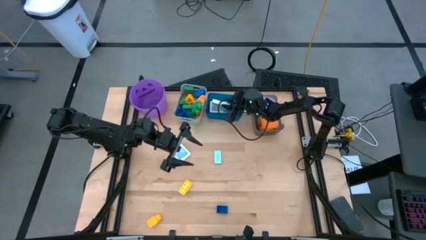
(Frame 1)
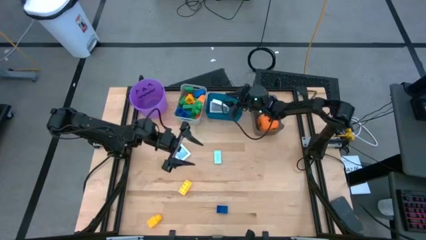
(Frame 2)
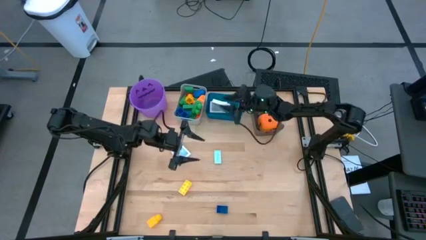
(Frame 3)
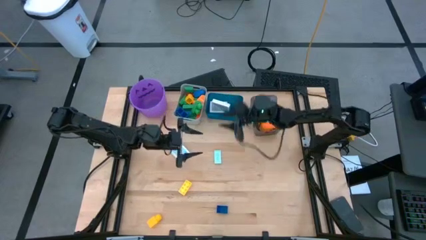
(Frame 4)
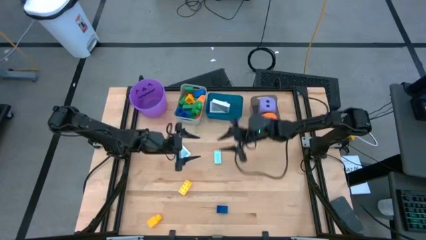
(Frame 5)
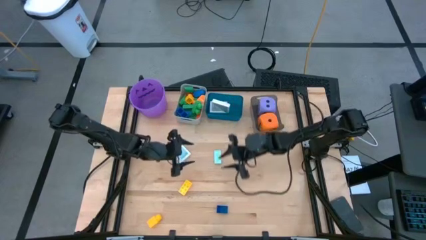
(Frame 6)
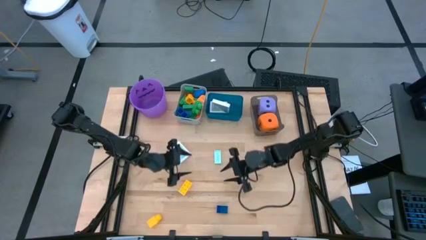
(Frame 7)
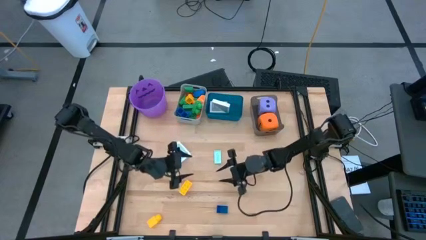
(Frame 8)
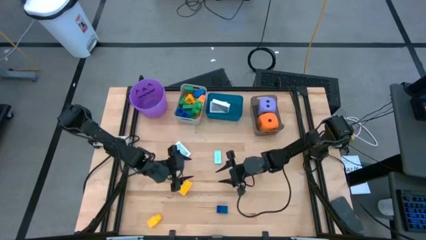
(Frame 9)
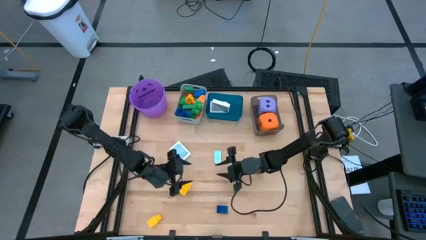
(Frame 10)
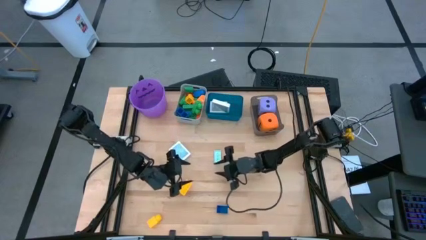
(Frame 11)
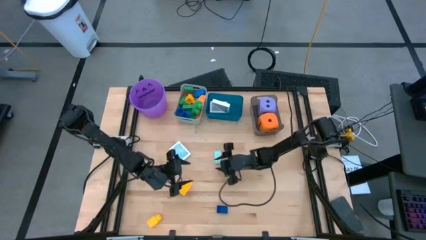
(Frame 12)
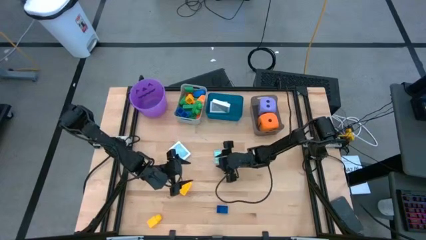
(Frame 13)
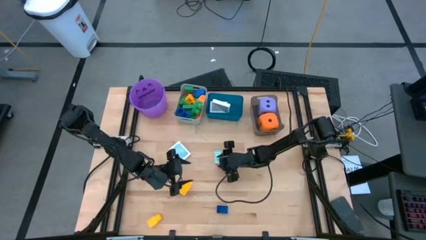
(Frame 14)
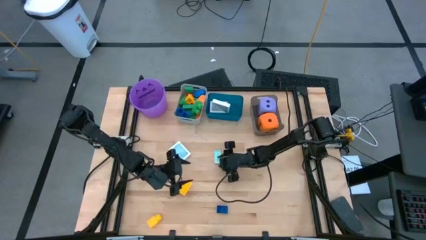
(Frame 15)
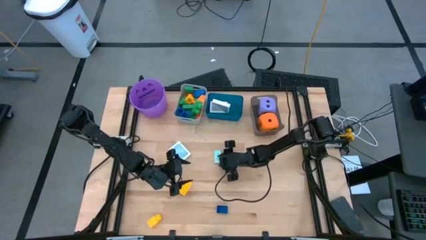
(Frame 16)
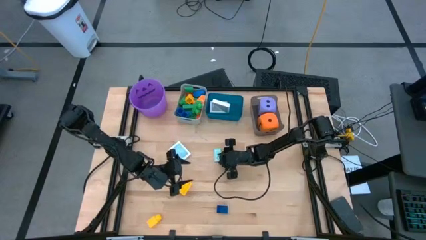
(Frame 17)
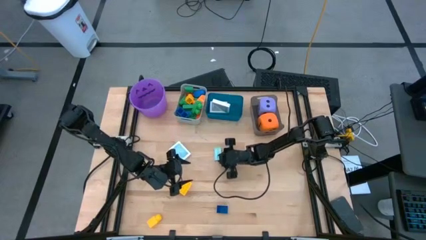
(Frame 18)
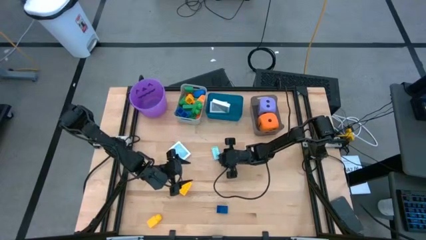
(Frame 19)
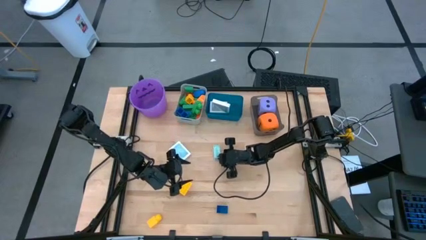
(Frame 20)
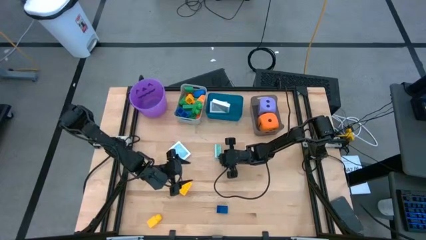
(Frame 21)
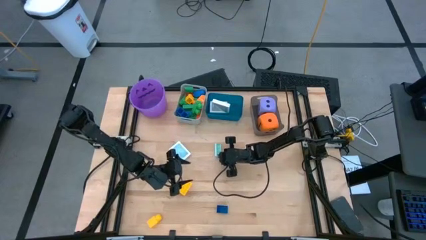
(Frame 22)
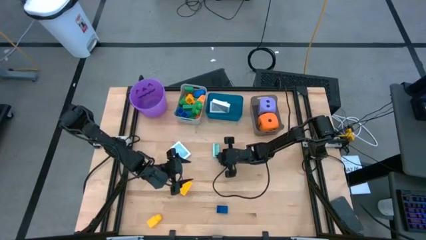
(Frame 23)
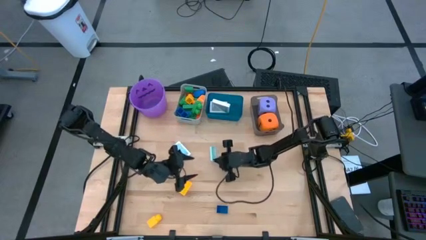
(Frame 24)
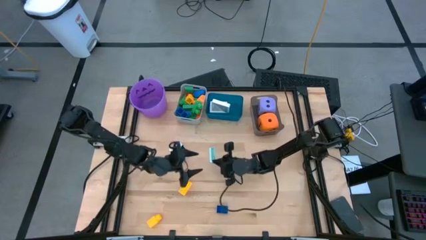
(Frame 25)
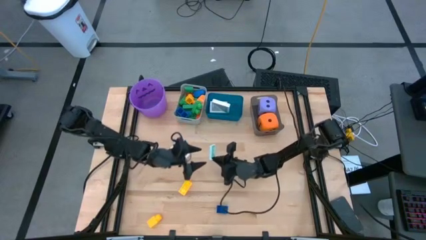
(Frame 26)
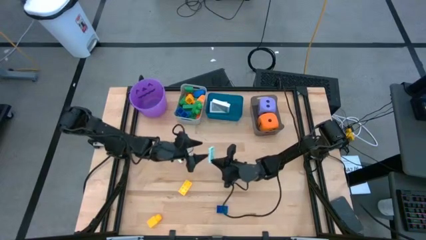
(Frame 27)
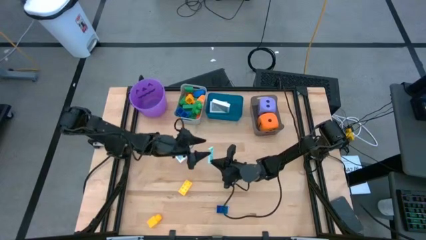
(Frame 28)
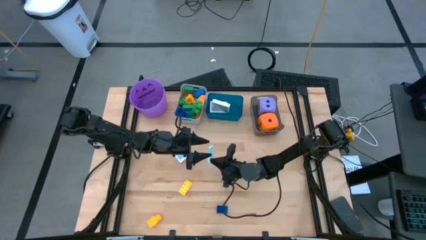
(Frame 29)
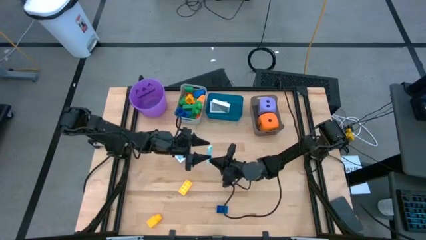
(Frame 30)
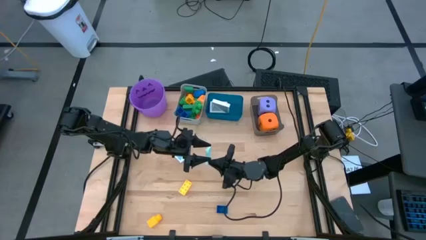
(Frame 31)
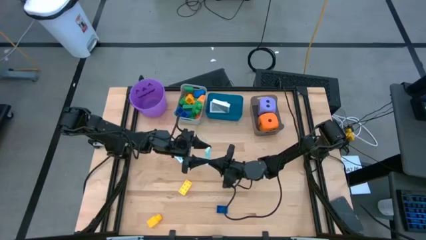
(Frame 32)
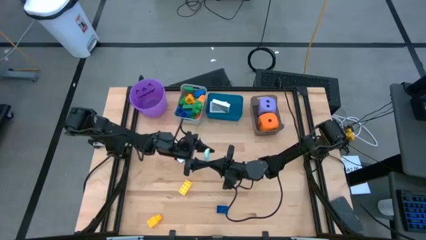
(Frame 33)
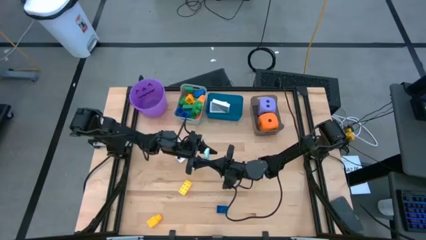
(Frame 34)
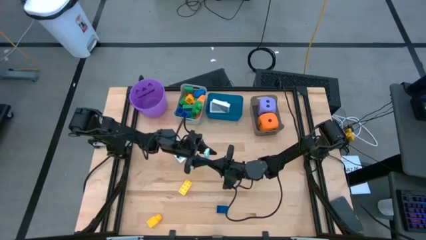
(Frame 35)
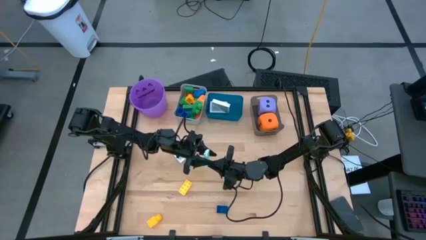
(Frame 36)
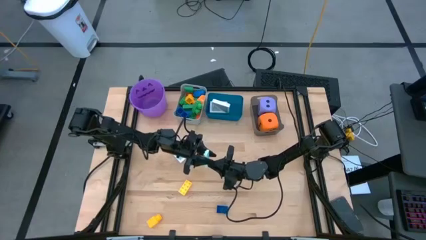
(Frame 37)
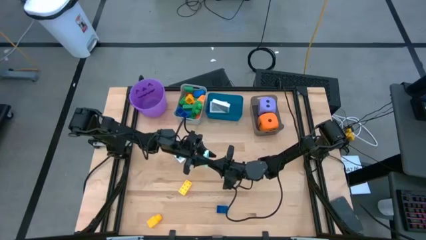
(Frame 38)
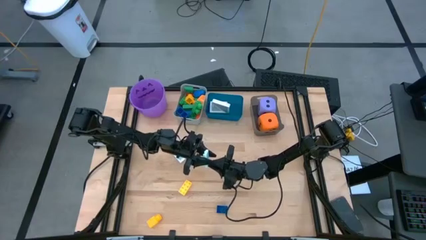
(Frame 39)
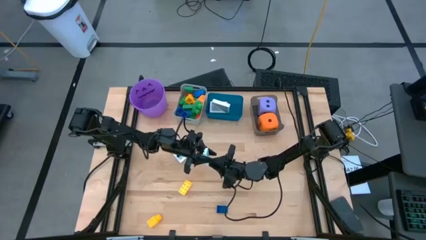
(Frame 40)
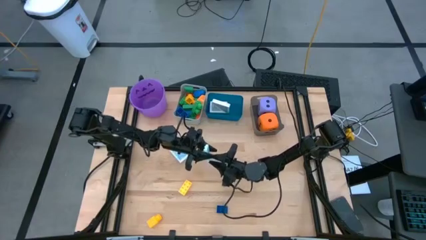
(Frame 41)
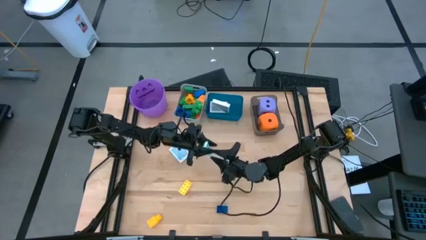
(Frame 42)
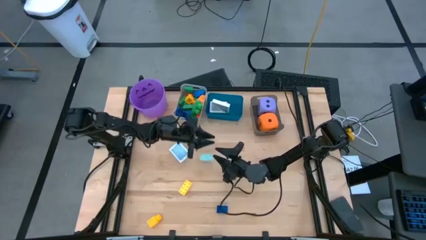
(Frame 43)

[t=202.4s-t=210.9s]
Task: Pick & Place Toys
Put the light green game piece into the gray bin

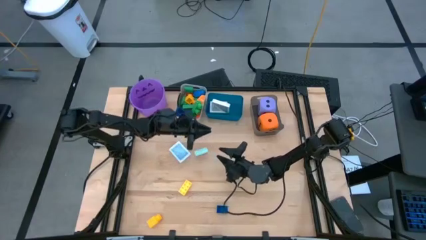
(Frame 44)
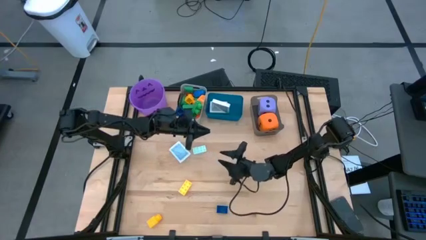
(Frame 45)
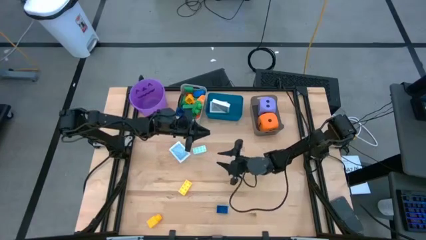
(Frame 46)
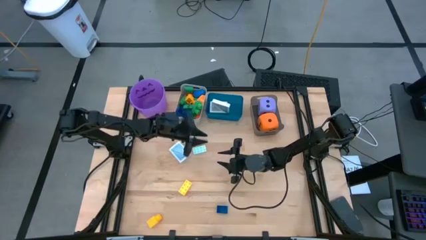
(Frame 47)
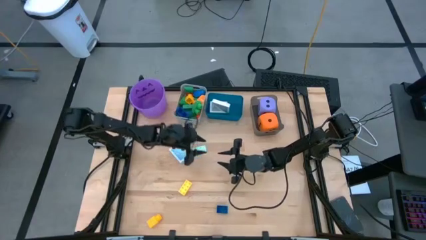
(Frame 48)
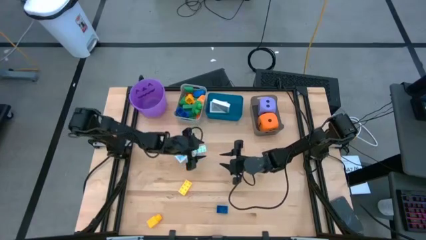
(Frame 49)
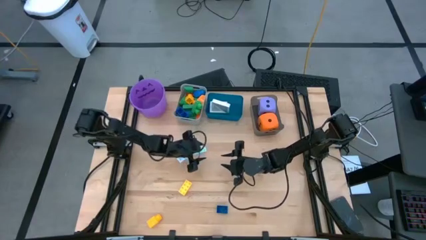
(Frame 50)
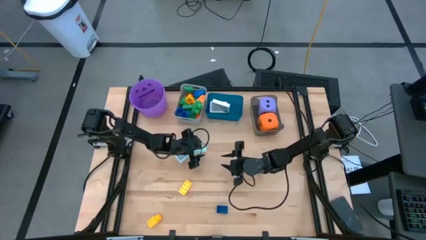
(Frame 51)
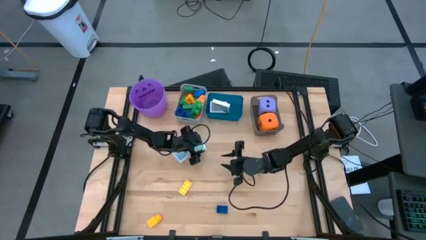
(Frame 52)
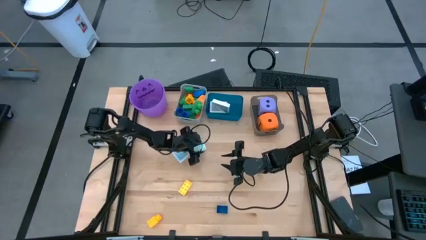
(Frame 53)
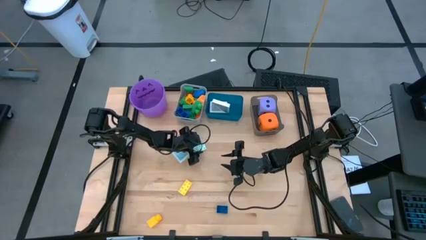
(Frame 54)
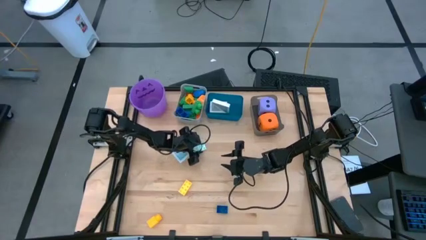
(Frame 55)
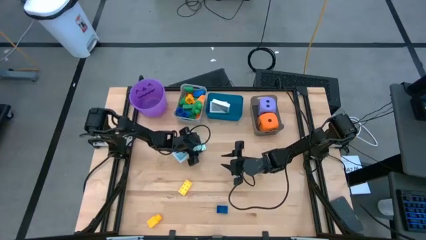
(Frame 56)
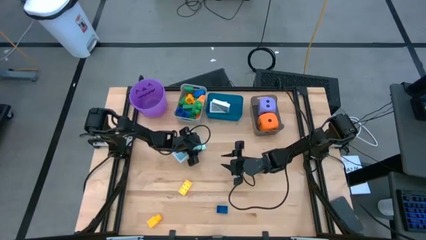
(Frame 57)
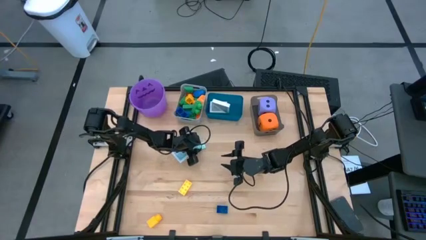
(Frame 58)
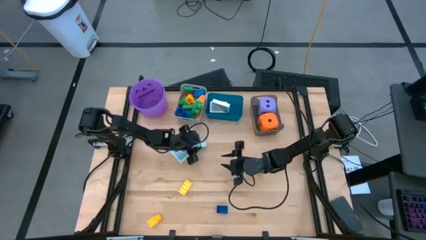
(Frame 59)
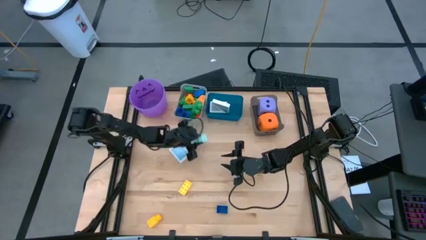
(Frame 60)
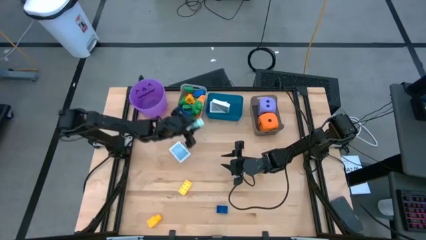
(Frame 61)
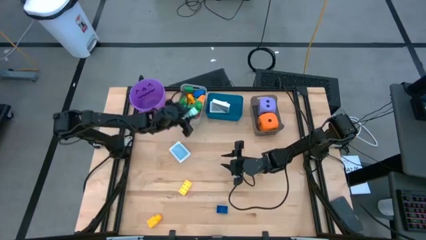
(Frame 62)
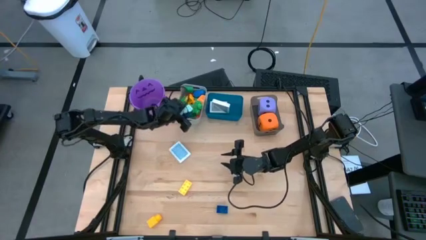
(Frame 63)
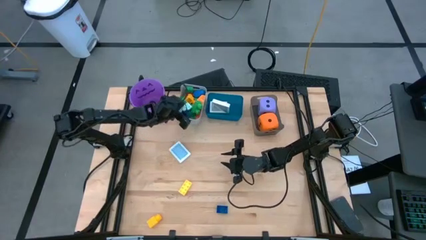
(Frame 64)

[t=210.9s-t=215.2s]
Put the light green game piece into the gray bin

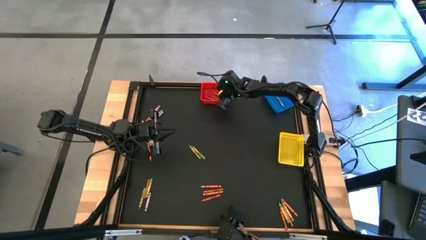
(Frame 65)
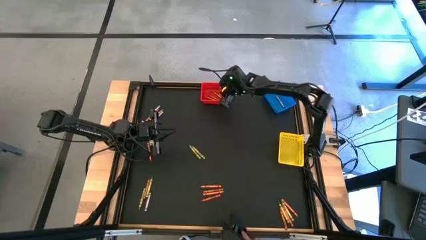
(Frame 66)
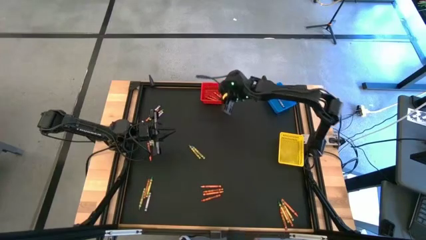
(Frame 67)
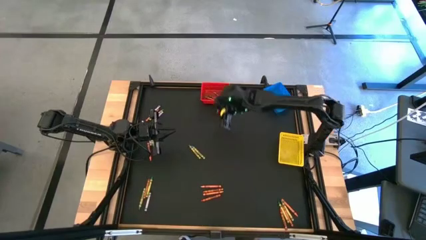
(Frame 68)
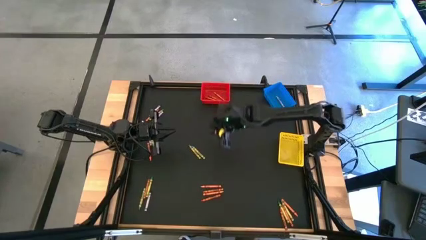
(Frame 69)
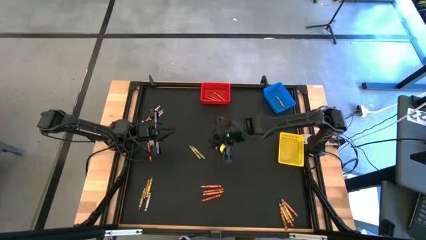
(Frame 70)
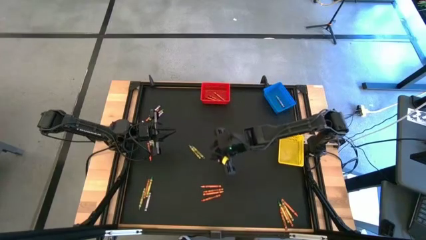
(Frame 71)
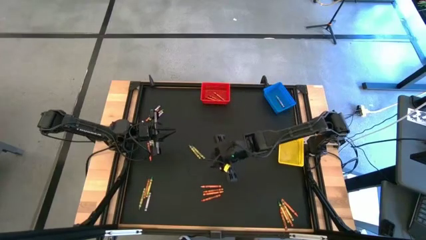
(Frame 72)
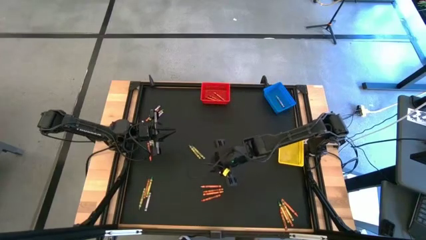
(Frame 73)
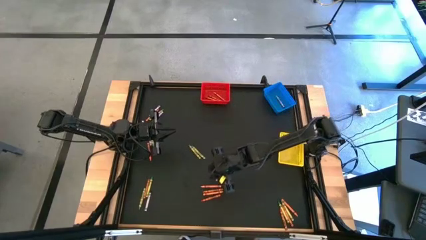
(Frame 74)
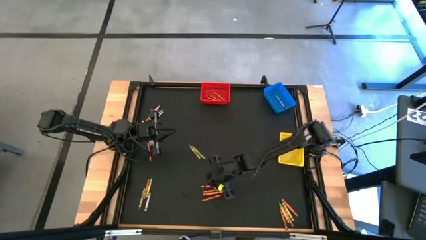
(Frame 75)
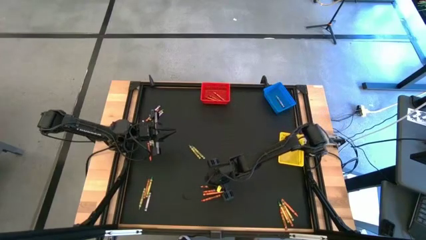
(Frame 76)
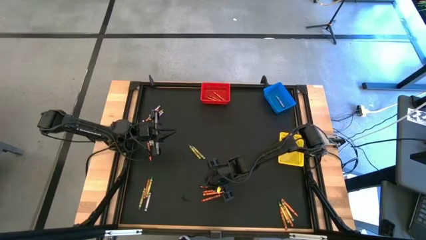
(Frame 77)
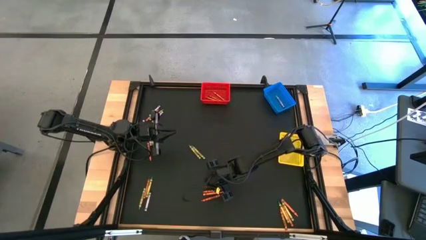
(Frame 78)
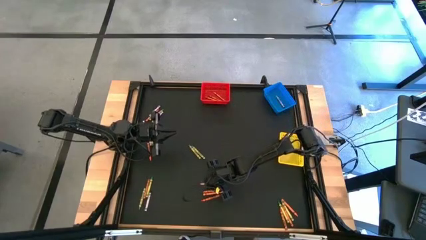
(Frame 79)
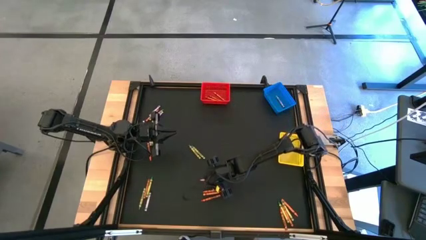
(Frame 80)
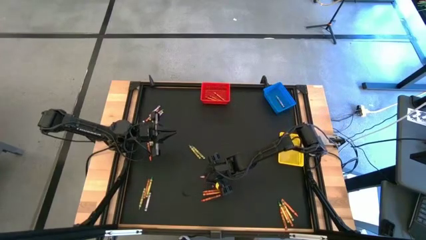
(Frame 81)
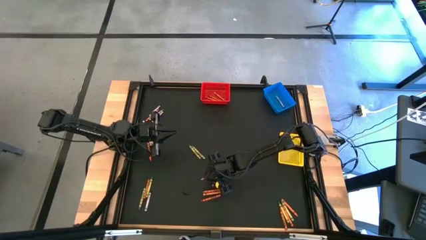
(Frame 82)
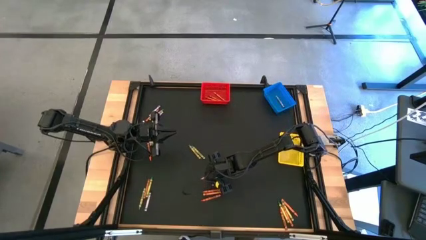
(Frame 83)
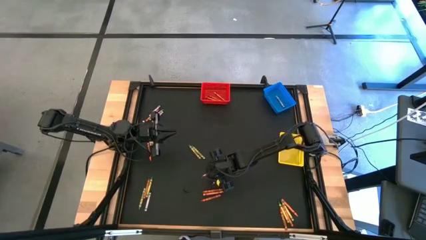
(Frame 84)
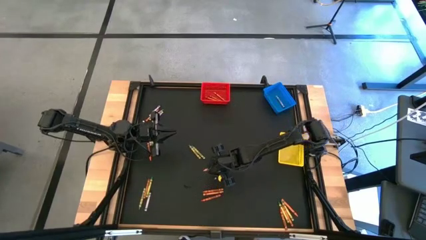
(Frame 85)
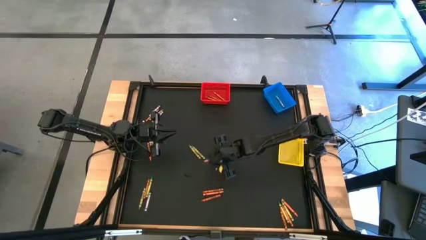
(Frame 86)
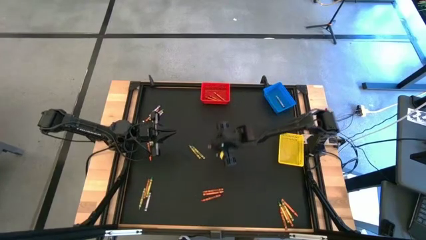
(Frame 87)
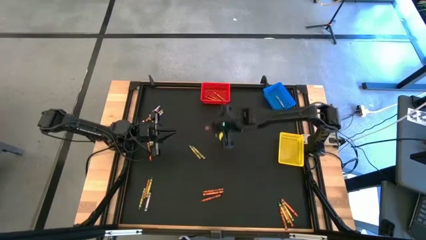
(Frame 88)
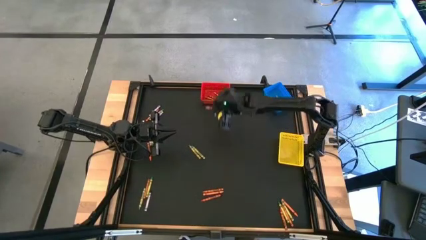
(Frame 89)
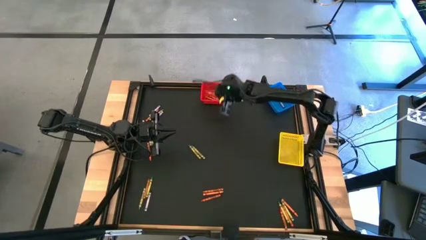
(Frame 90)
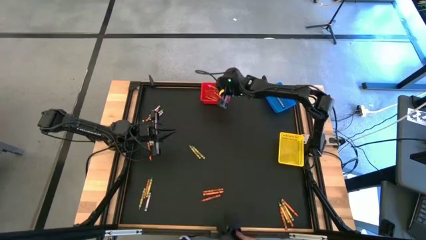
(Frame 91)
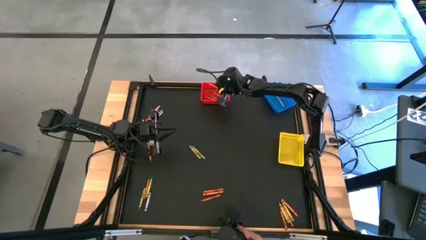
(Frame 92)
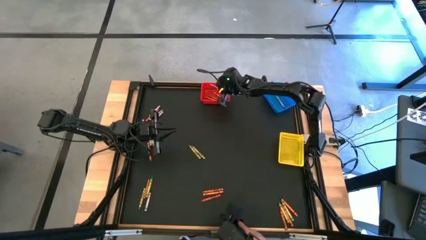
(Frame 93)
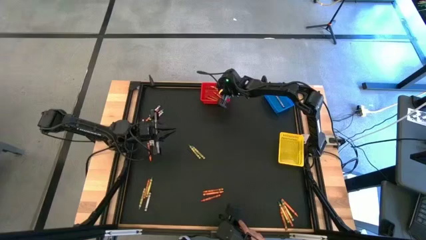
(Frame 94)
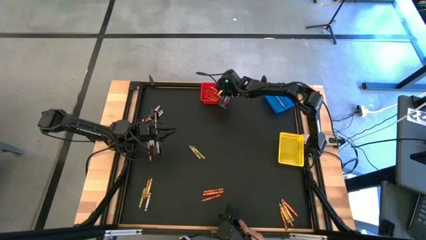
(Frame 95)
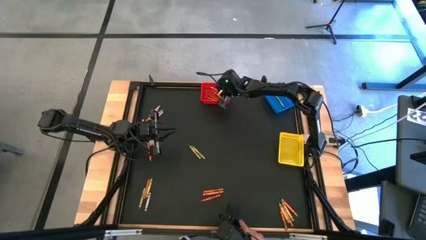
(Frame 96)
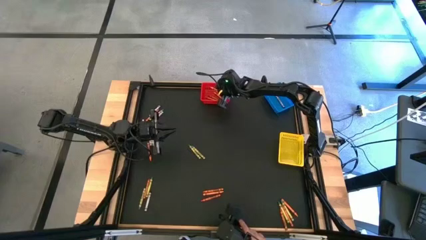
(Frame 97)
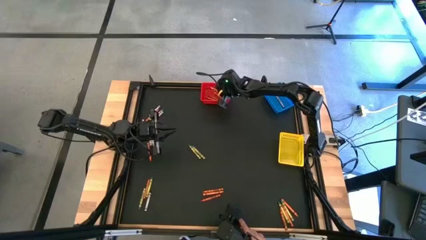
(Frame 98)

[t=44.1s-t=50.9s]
Task: Sort crayons
Put the orange crayon into the red bin
